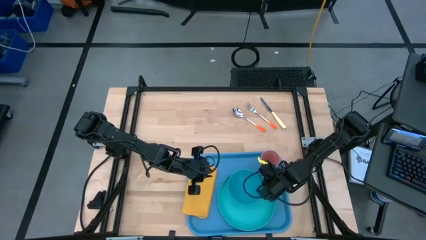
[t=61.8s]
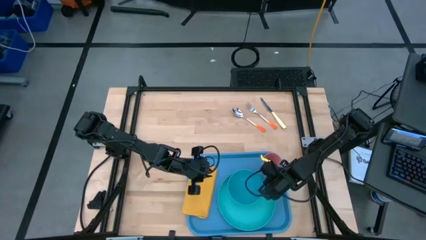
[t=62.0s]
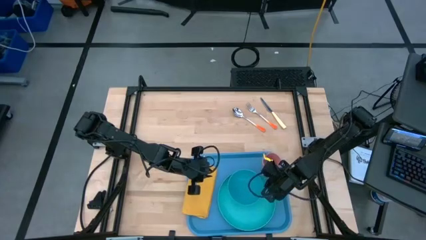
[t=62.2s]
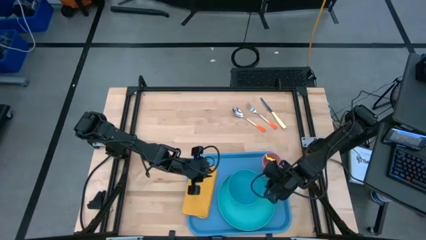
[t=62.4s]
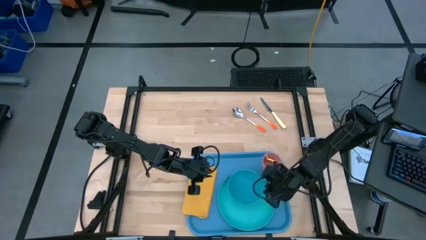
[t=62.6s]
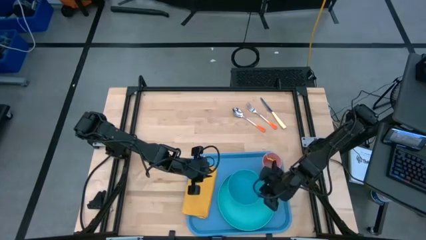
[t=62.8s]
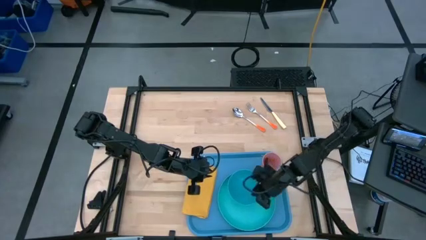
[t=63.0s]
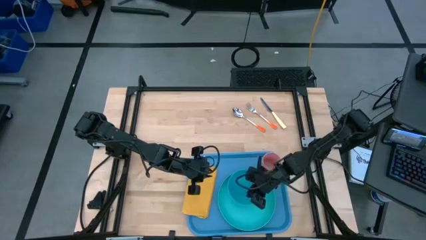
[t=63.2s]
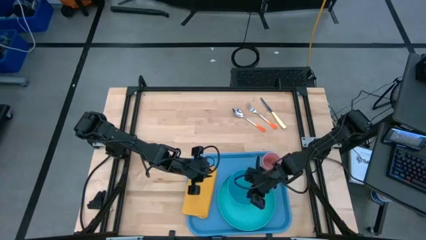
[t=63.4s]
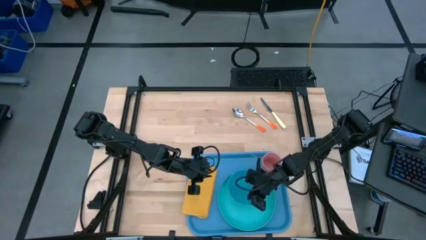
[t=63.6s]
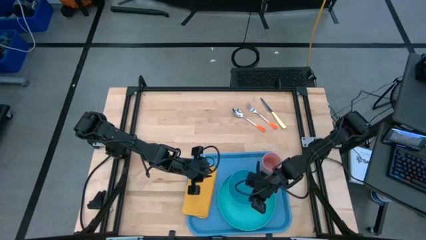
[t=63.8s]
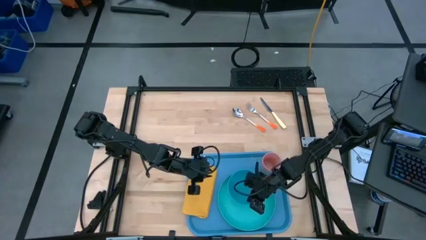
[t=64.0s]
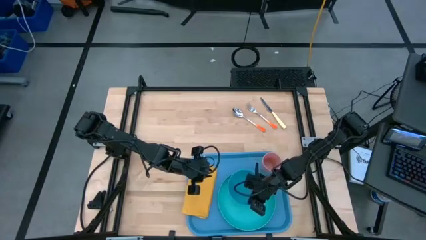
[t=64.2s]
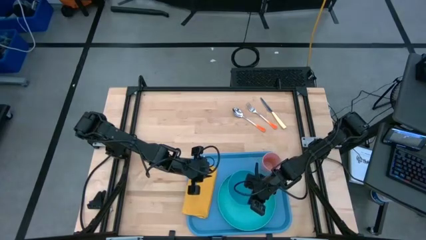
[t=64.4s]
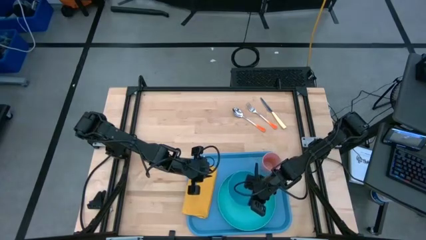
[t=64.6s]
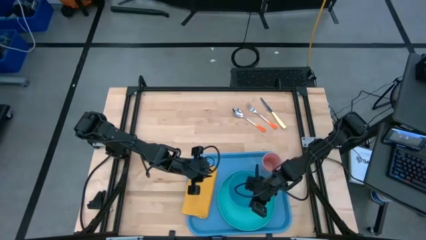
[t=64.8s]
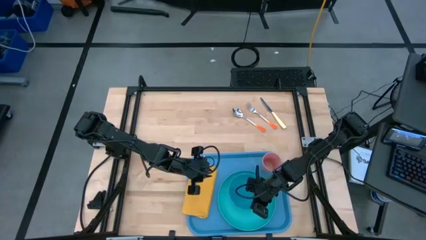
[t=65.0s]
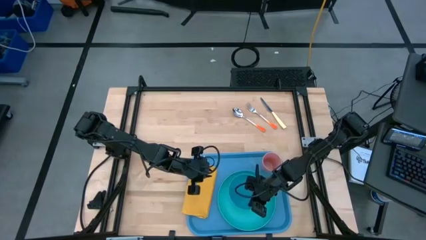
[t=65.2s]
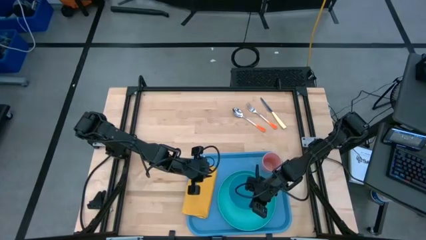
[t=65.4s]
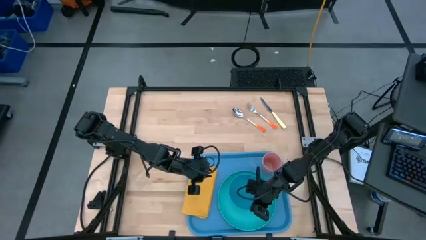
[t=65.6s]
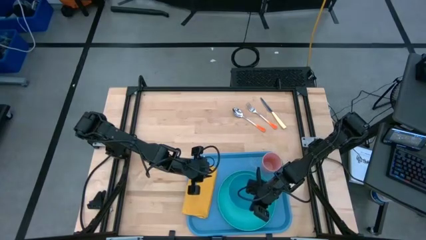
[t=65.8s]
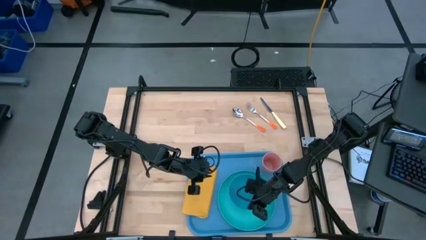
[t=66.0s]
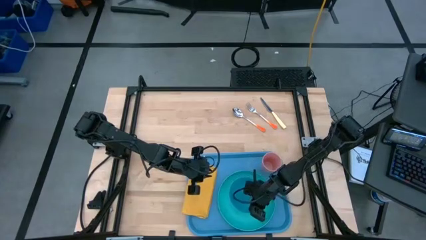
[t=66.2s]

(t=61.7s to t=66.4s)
Task: Set up tray
Adjust the blue bowl on the blue plate

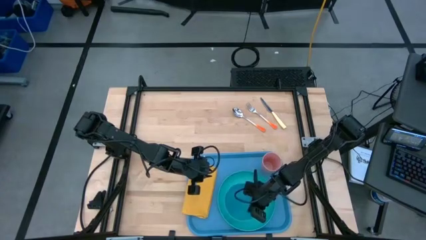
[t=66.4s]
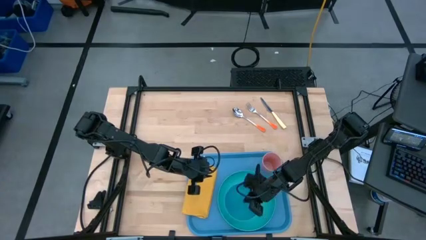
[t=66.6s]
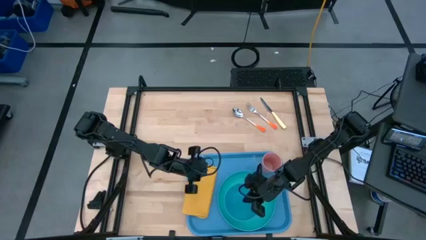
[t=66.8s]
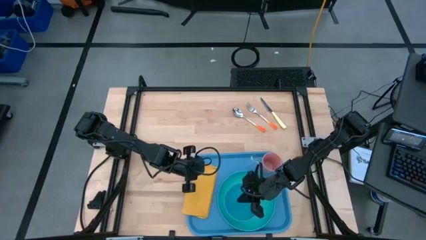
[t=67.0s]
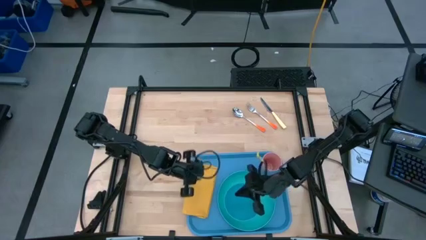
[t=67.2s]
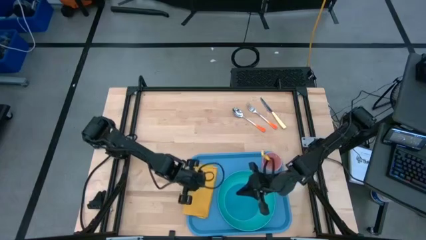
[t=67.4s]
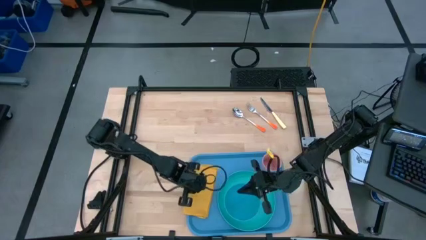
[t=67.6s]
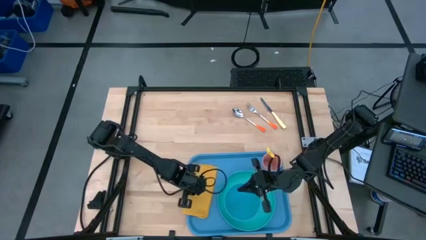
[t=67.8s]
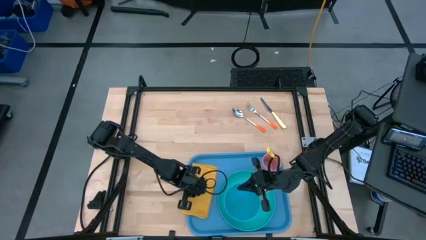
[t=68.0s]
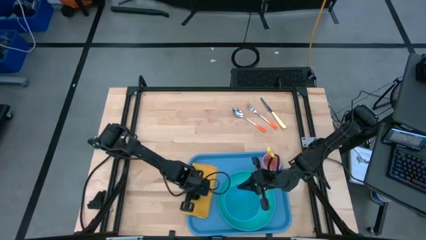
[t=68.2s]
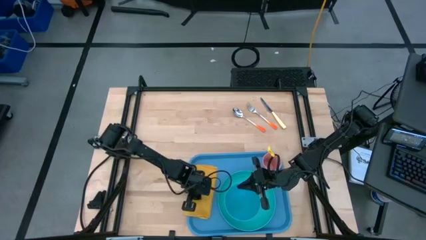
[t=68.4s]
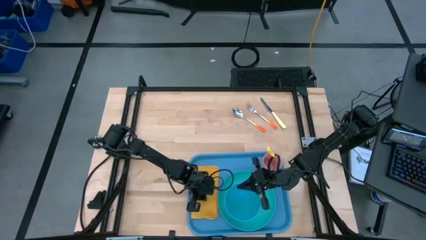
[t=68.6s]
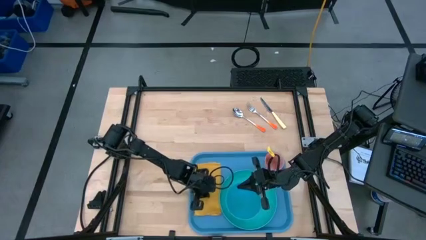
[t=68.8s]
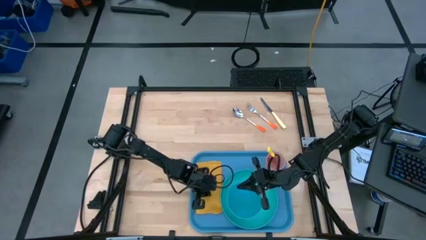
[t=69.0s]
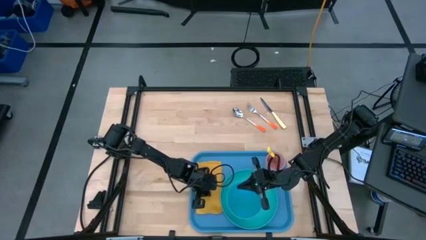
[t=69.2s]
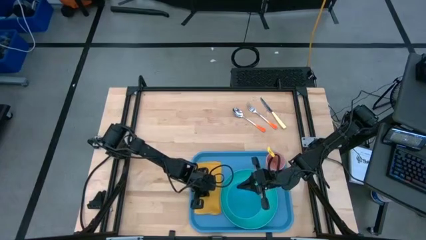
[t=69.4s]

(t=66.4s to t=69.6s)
Adjust the orange napkin on the blue serving tray

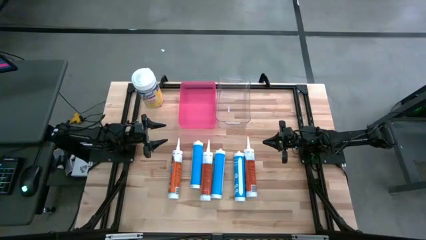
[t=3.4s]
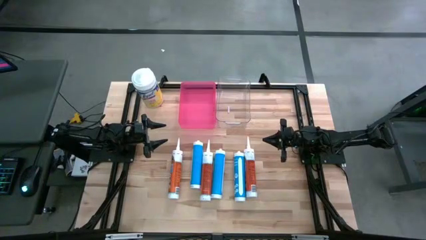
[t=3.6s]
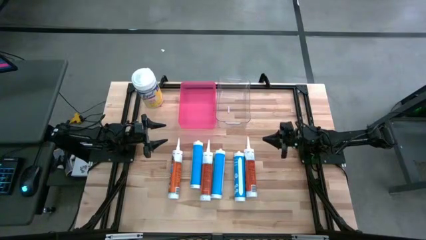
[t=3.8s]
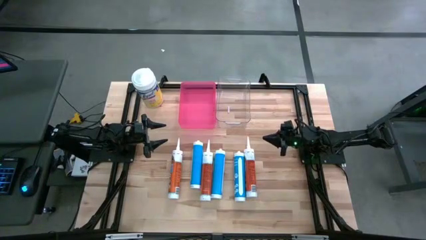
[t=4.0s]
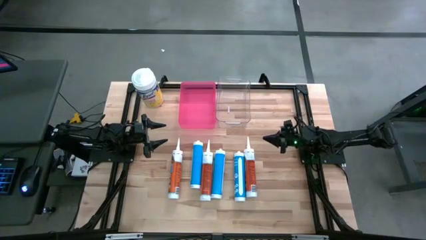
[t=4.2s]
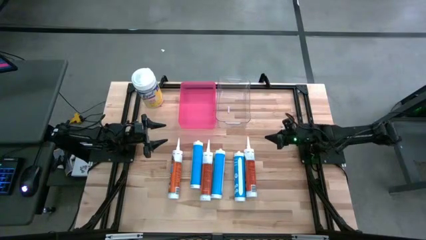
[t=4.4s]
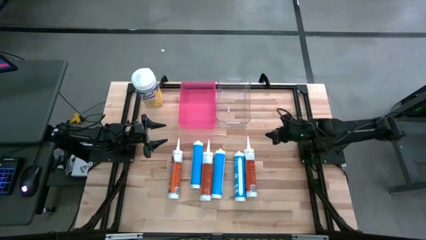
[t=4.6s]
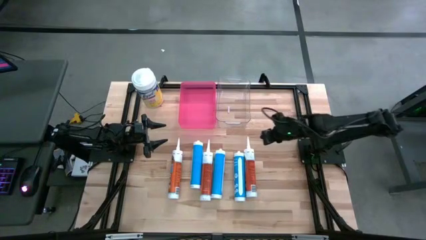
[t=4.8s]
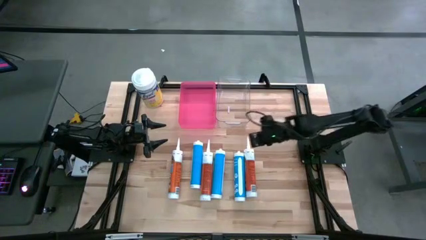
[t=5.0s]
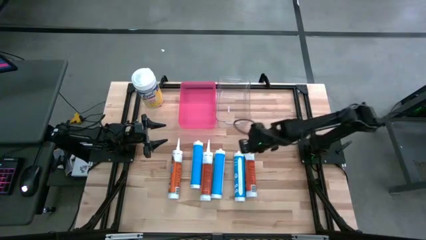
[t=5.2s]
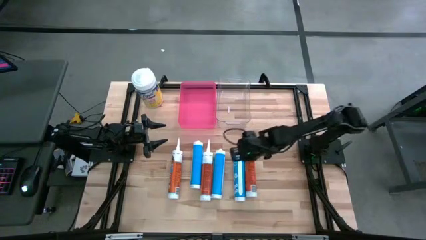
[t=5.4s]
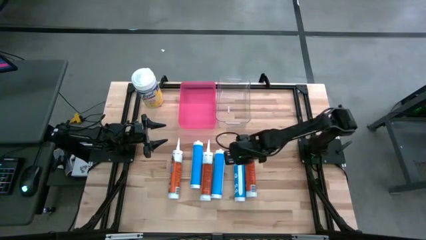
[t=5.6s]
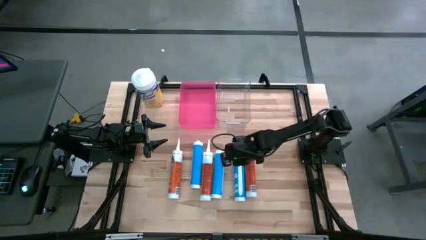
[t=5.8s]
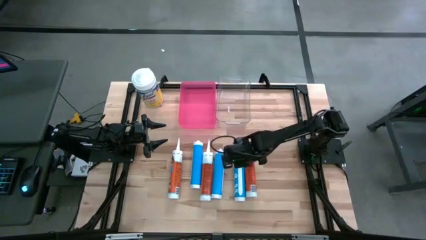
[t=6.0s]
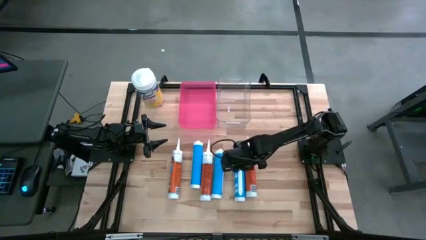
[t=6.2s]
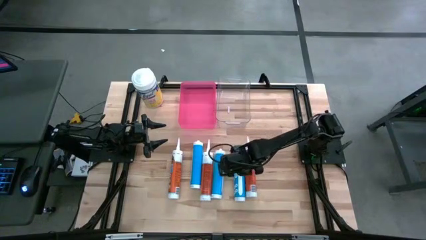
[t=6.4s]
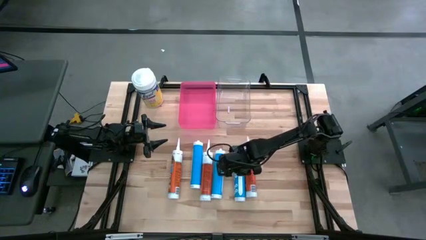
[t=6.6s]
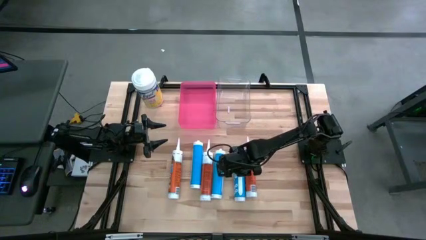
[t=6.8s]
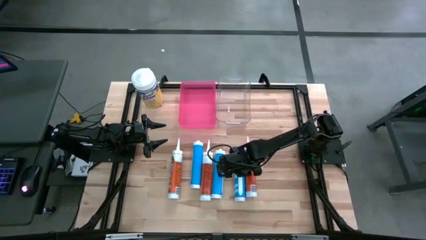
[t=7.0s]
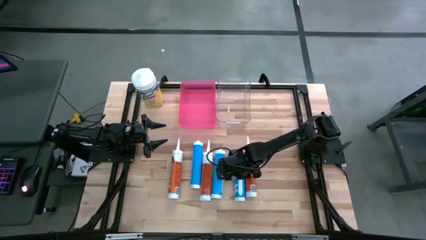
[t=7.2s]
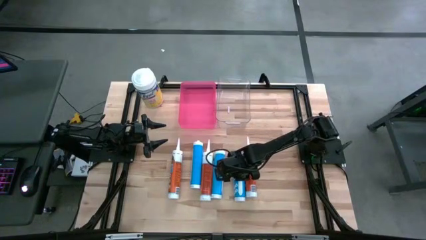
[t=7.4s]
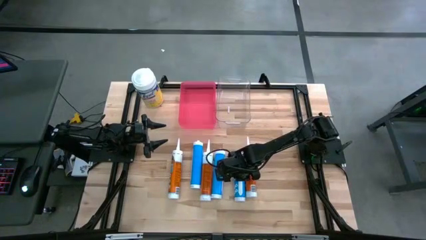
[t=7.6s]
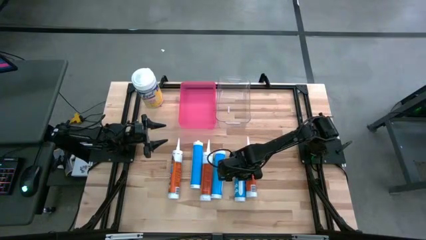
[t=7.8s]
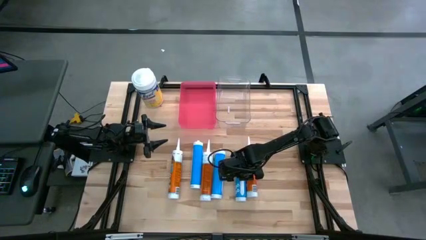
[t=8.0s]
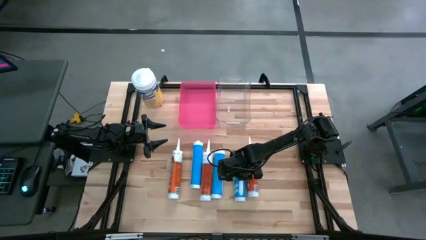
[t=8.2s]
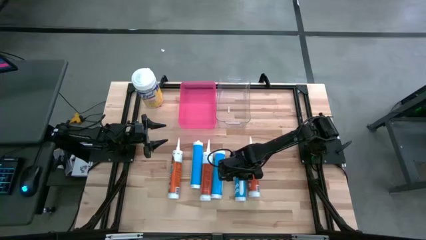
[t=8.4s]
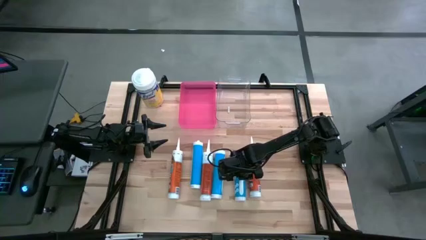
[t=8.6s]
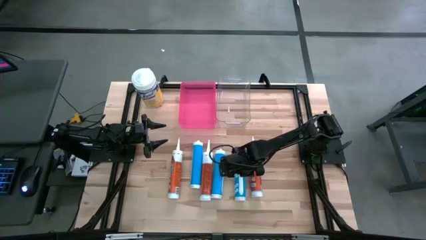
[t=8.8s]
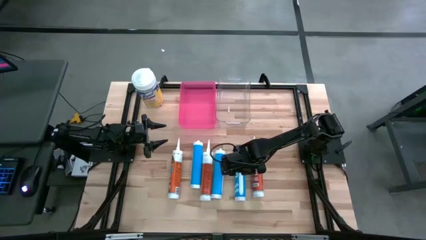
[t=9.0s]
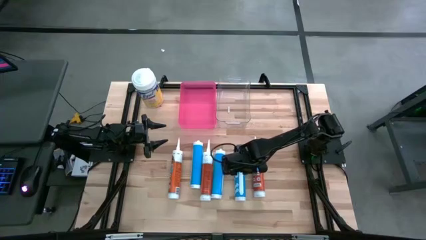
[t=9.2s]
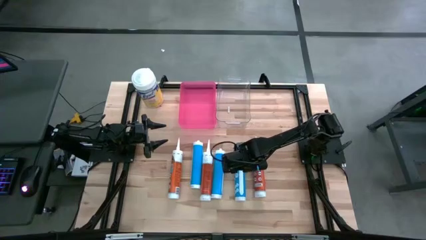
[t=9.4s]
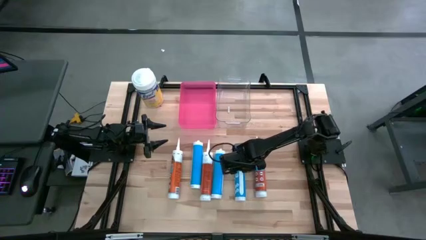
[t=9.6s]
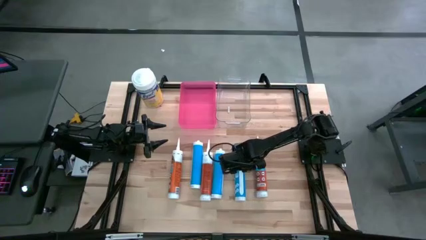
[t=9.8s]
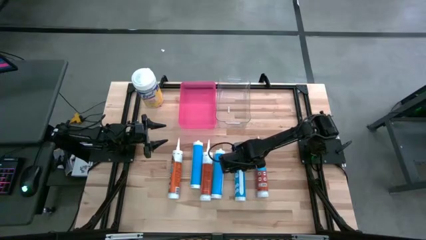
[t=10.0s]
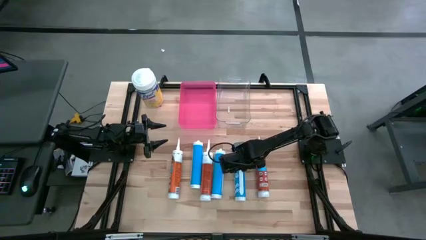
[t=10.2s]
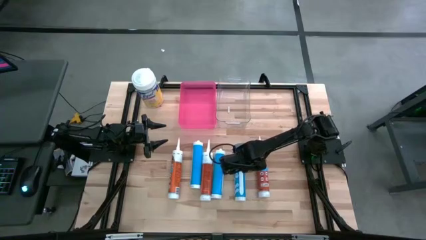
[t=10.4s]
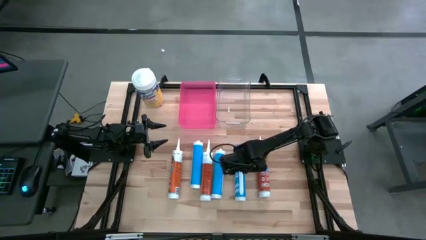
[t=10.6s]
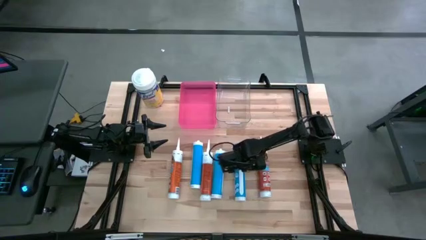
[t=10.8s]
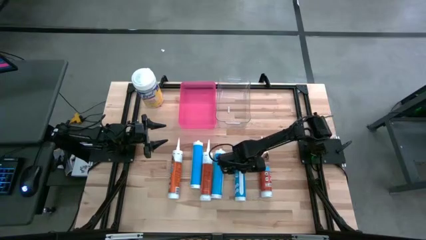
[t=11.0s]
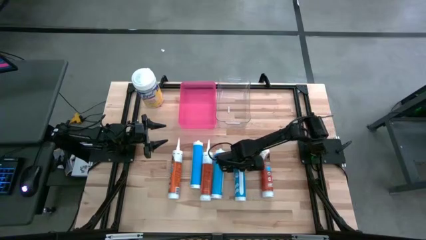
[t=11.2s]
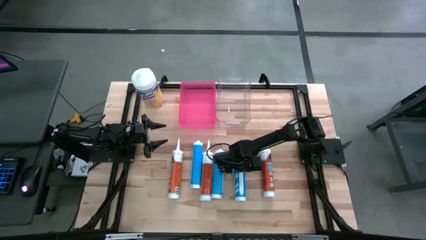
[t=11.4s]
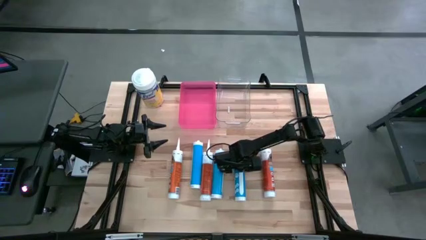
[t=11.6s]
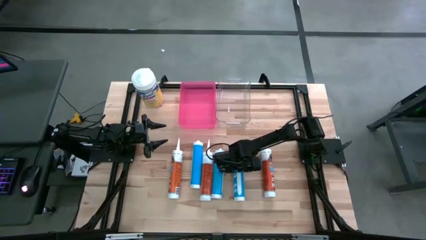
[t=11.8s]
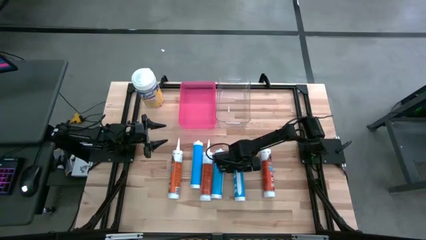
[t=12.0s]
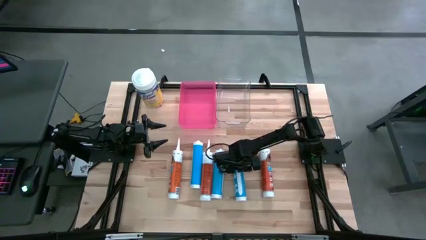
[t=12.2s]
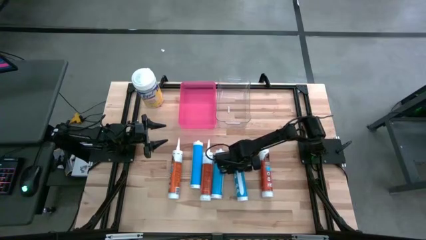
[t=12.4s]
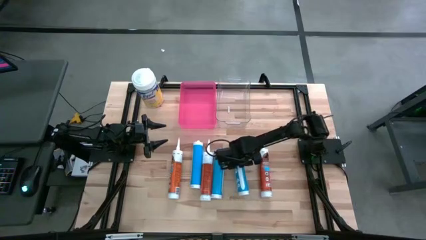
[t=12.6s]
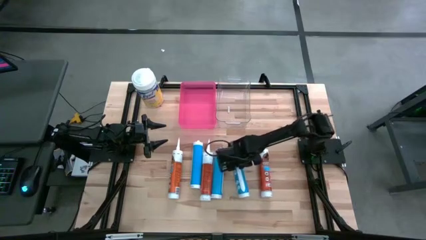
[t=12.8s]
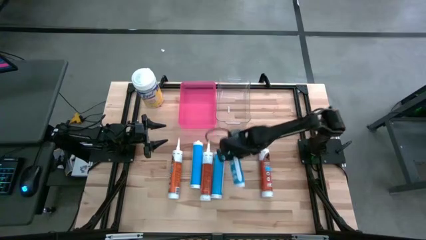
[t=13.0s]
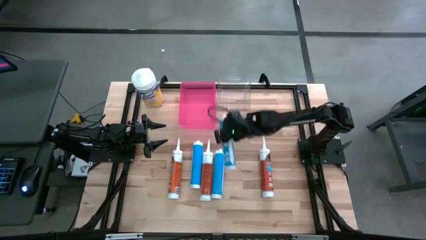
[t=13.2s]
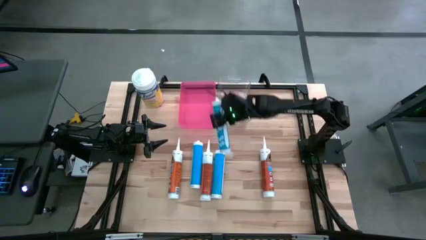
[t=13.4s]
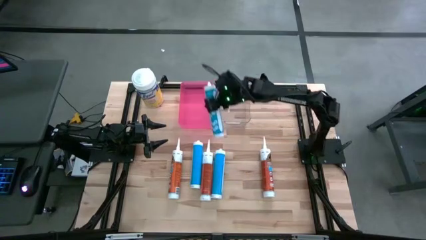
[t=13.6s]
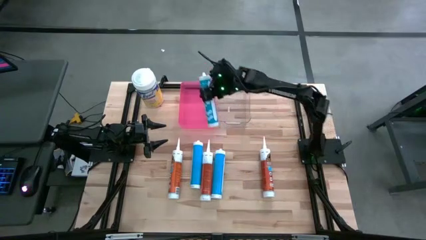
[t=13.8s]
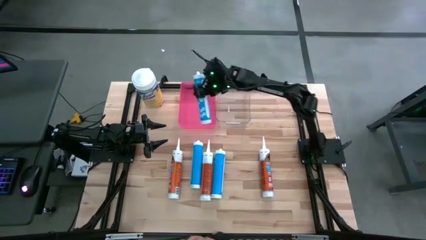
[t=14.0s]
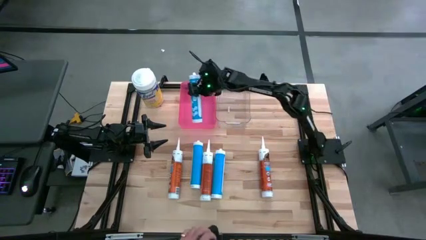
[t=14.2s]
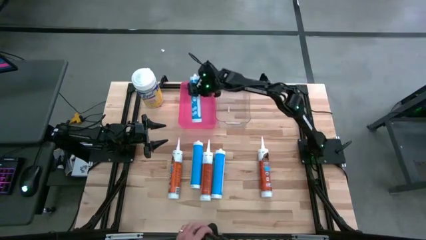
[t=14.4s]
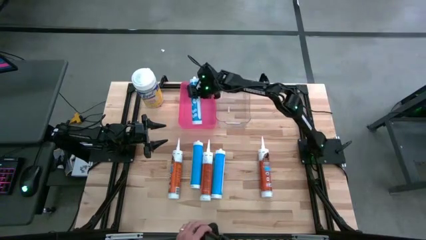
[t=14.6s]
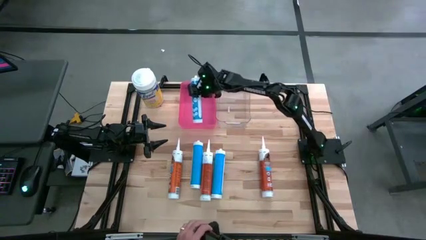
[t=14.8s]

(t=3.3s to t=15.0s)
Task: Sort silicone sealant tubes
Put the blue silicone sealant into the pink bin
